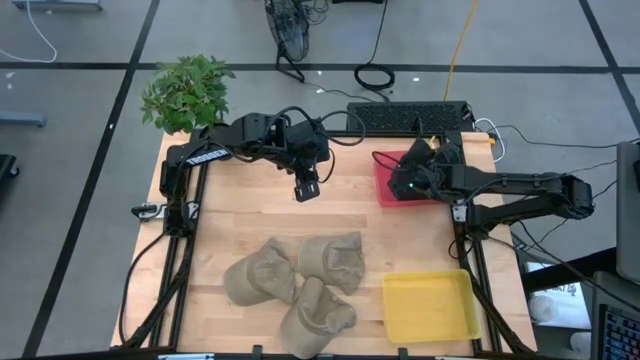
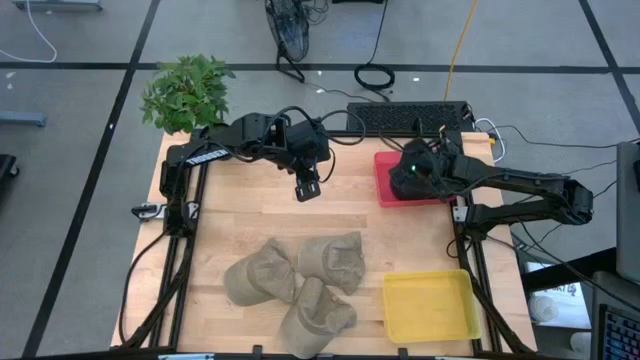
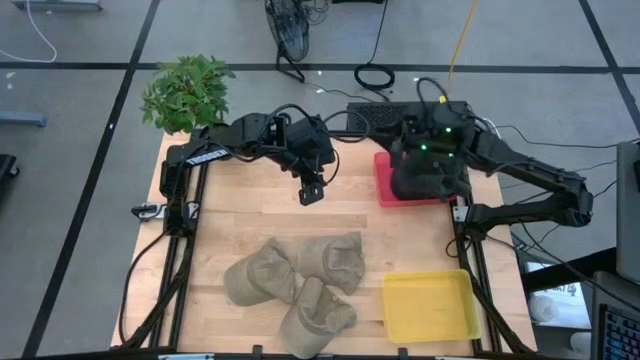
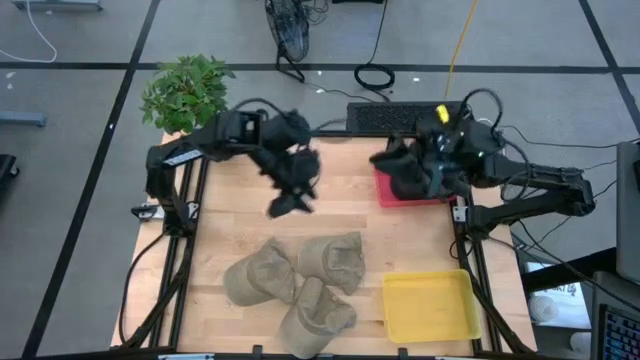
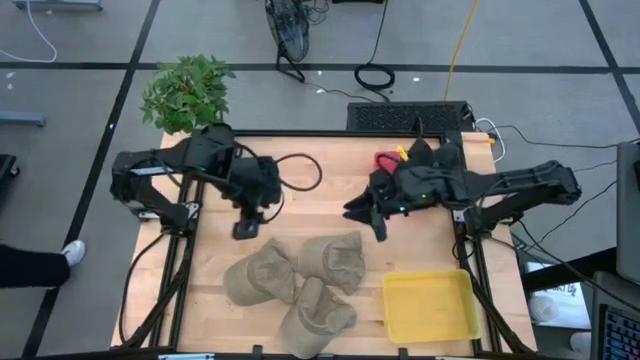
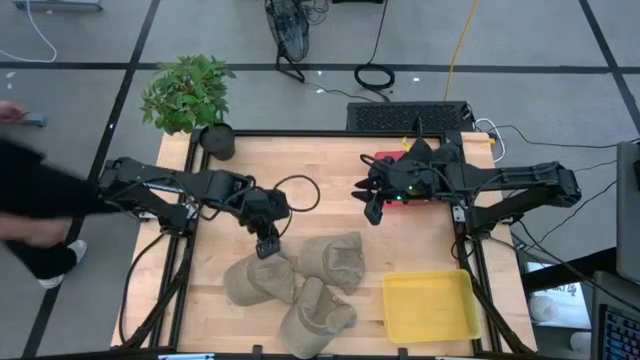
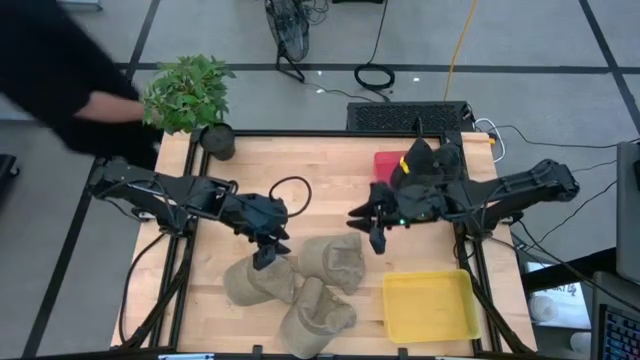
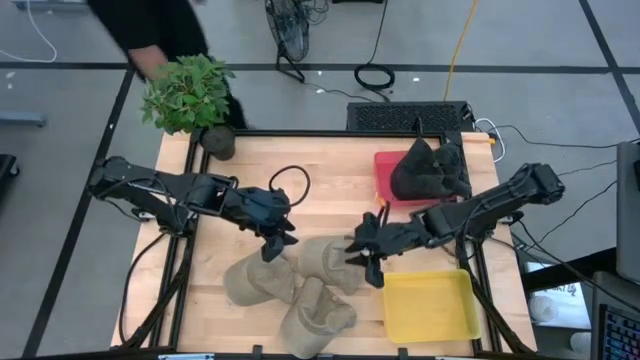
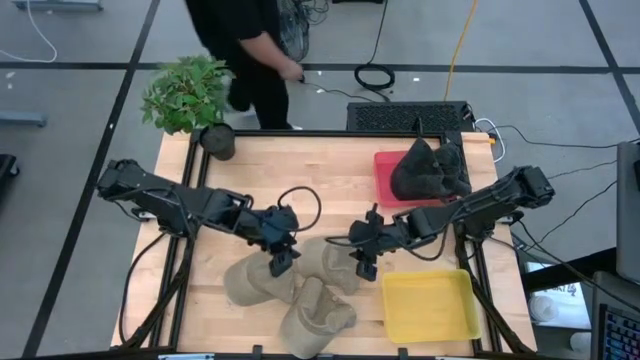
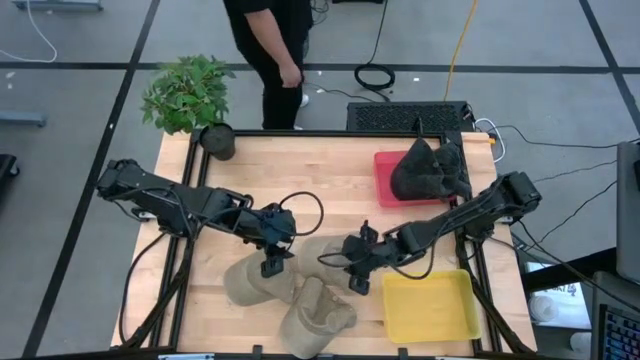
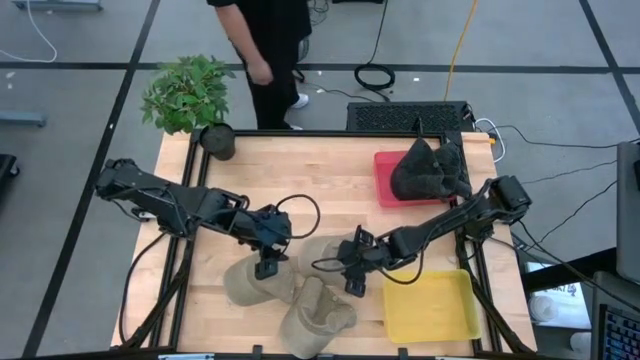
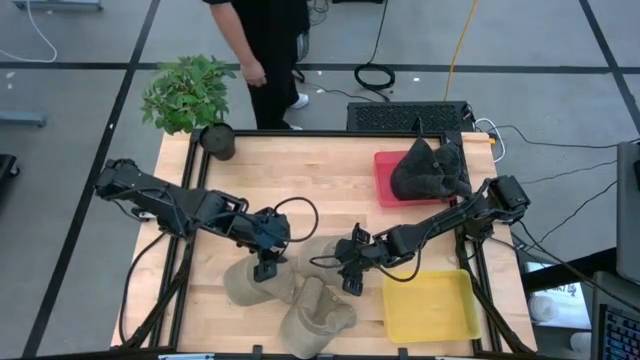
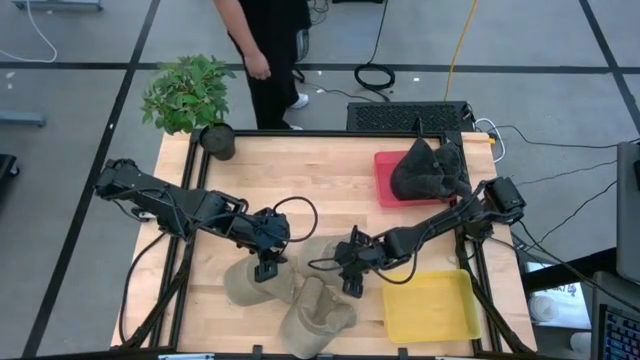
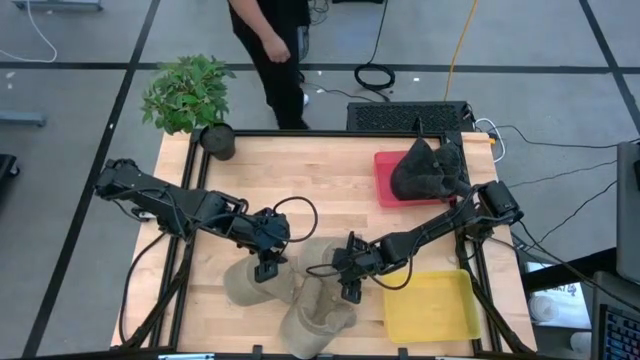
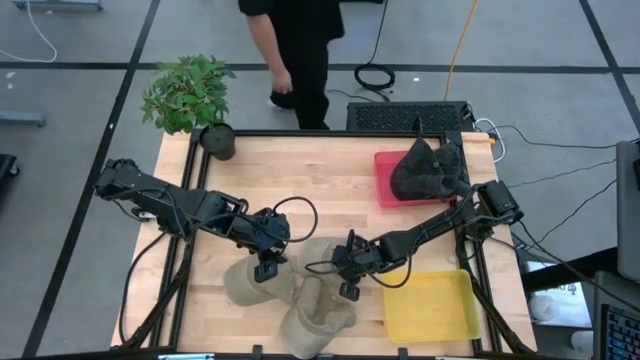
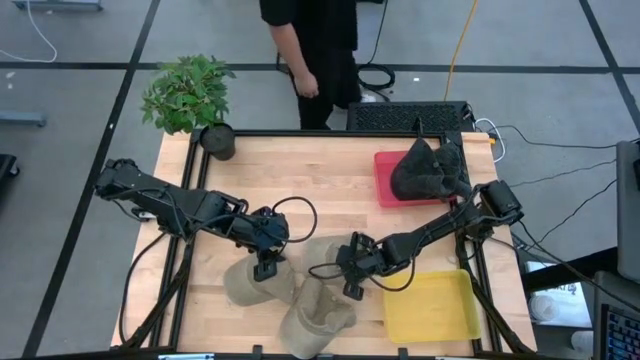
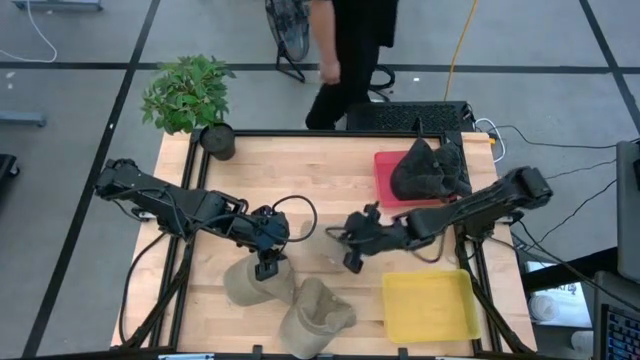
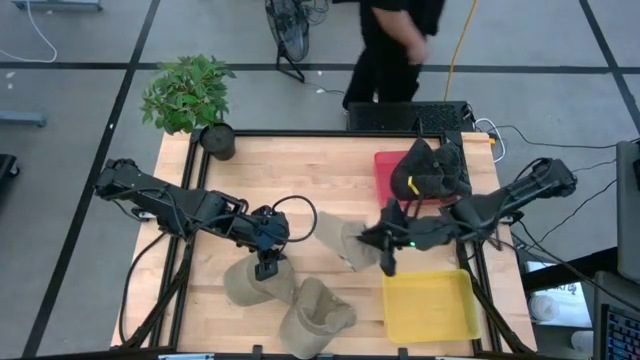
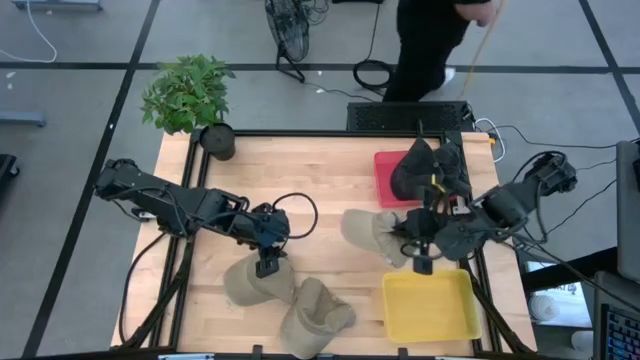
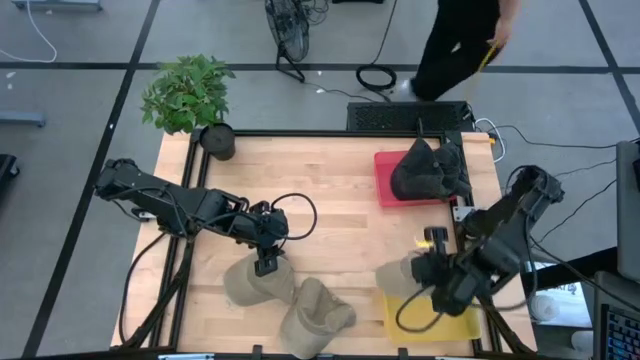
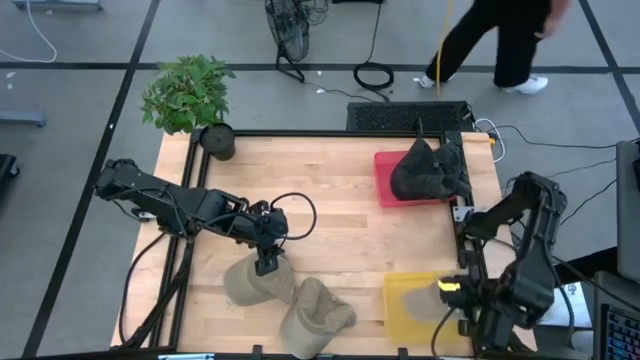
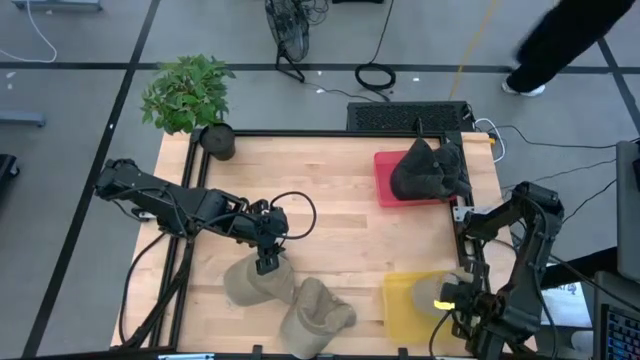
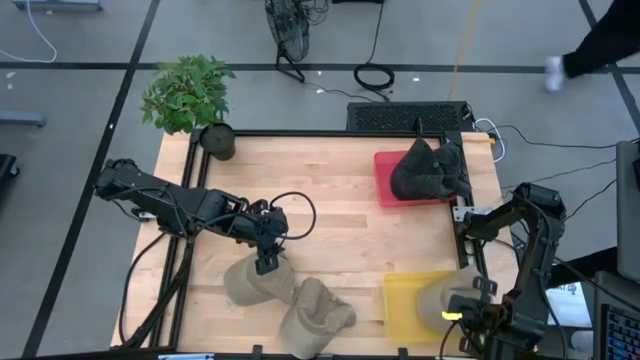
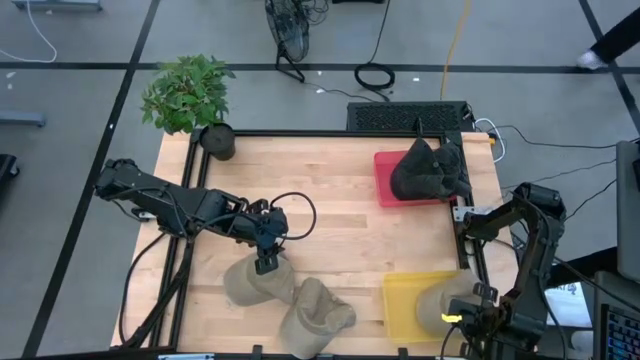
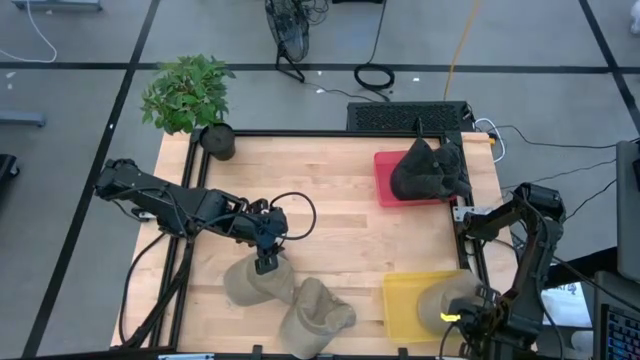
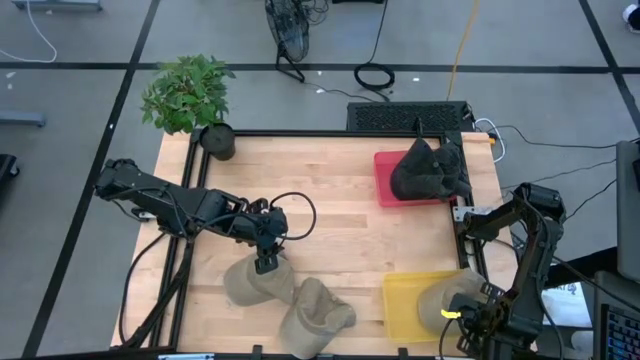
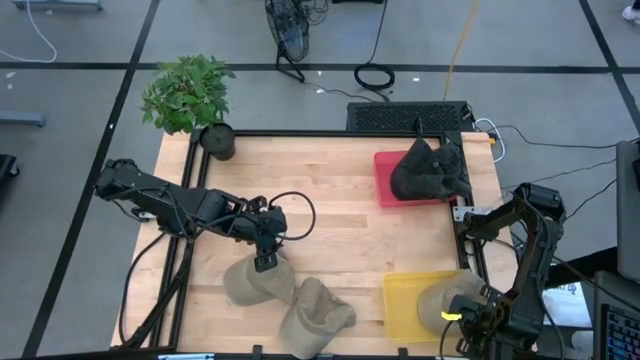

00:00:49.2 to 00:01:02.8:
Task: Pick & Place hat
Put the top brown cap into the yellow bin

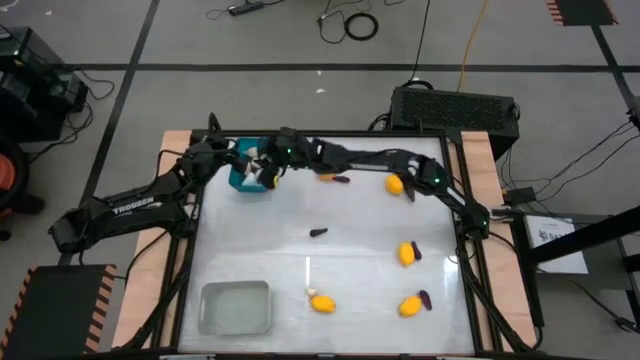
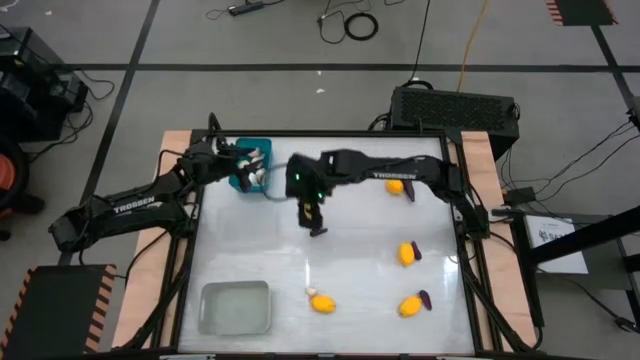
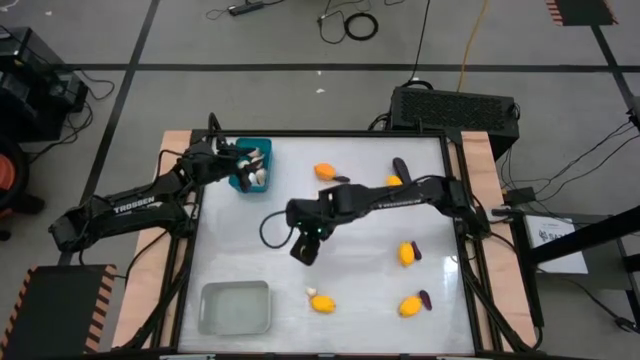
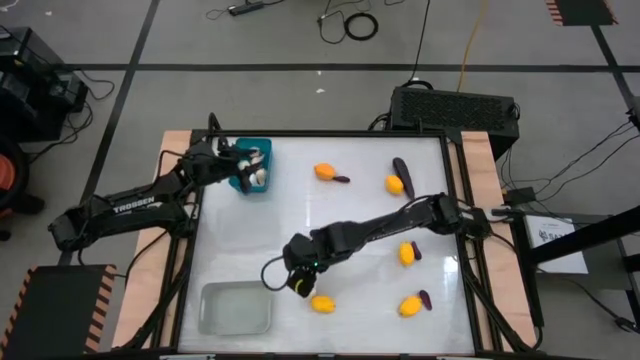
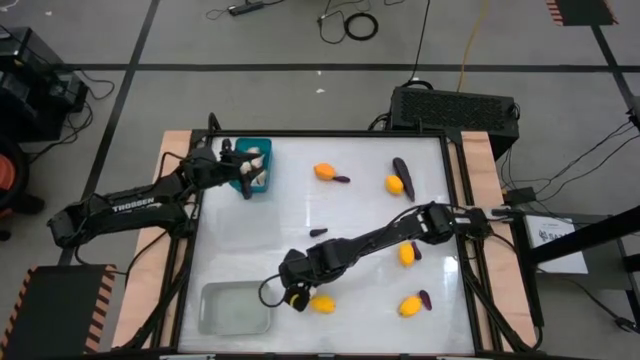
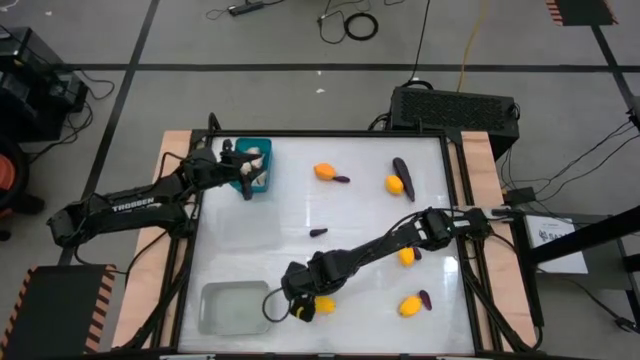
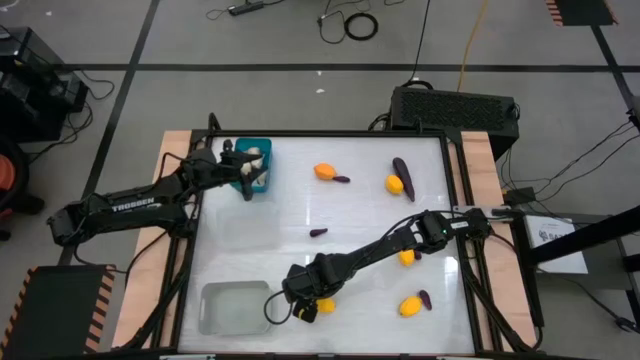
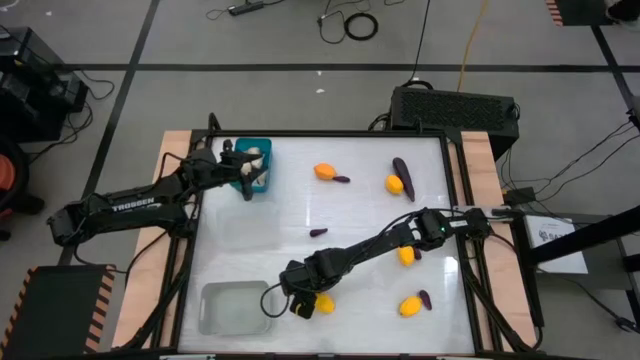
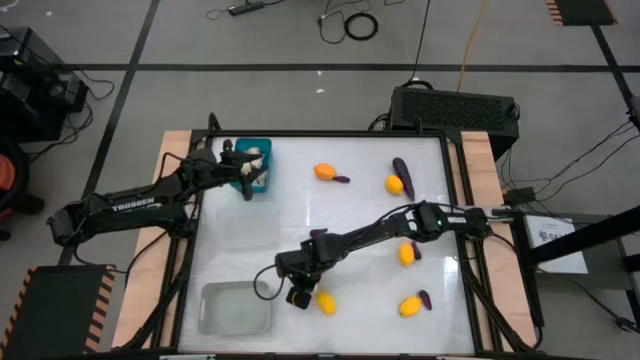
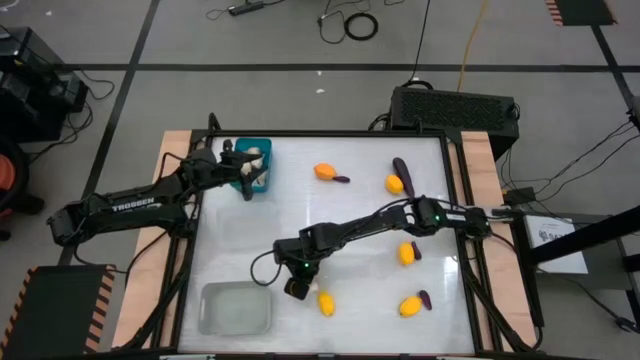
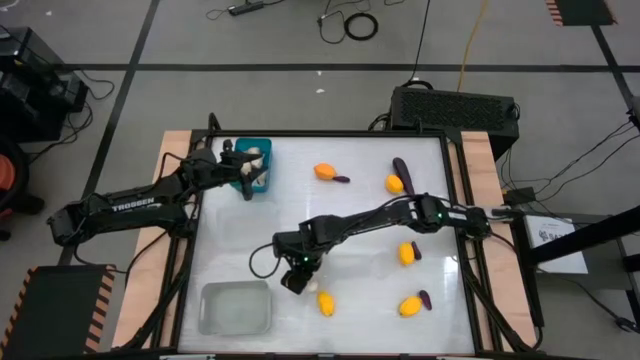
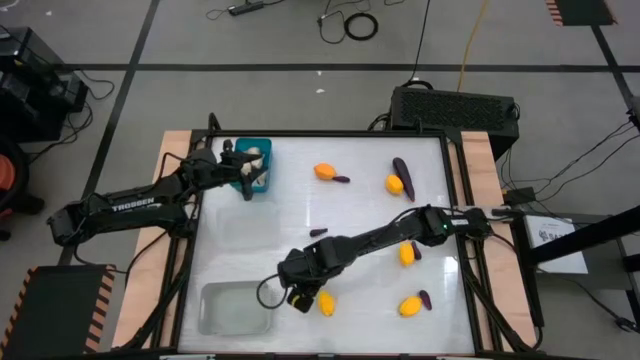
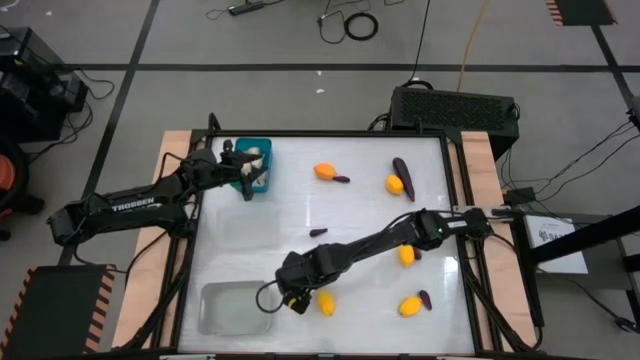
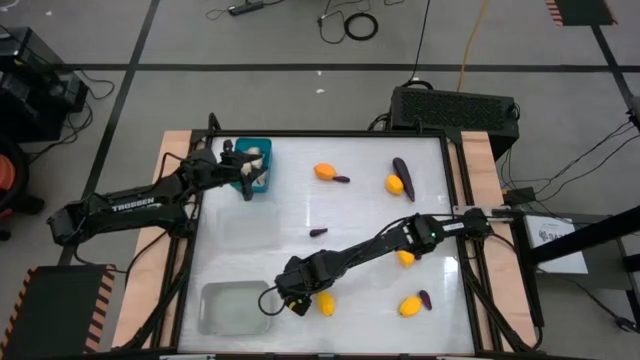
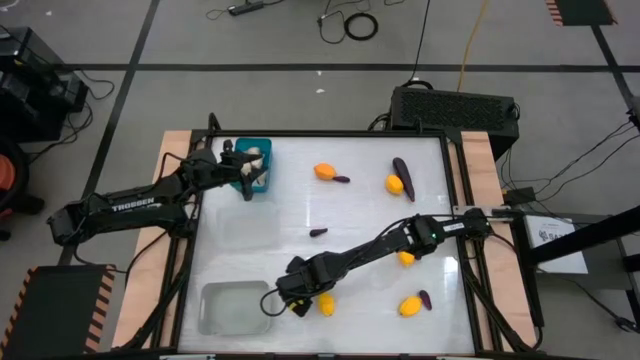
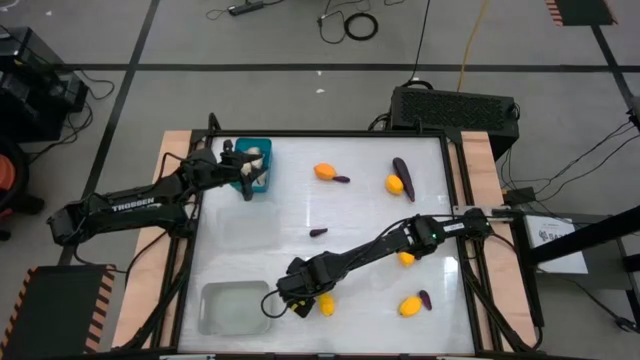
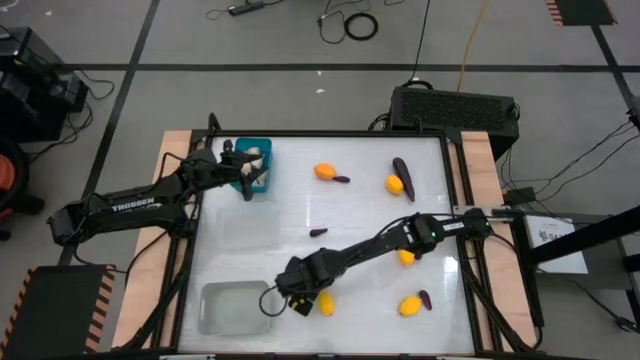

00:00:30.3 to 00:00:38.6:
Task: Sort produce into baskets
Put the garlic into the blue bin

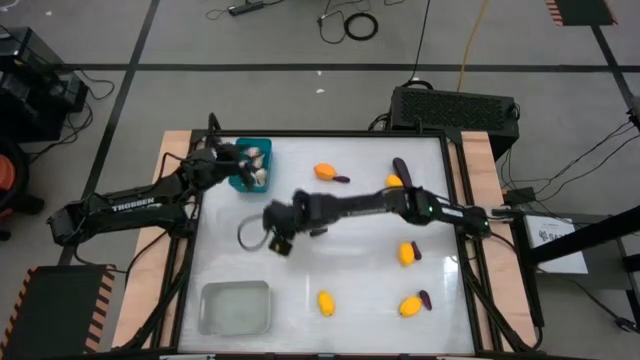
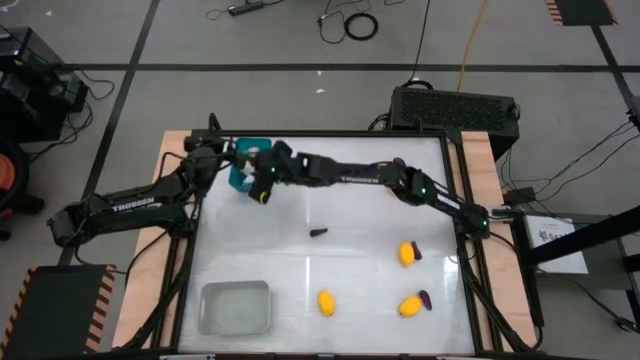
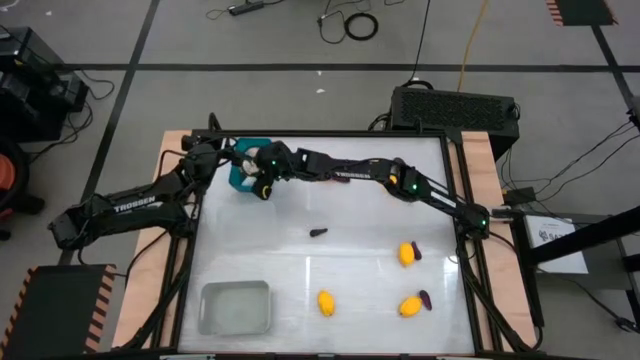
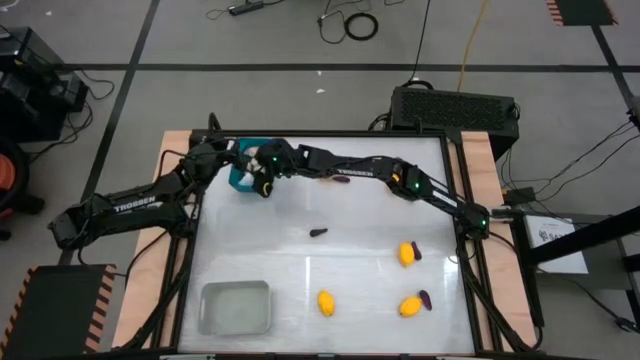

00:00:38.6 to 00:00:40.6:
Put the garlic into the bin
